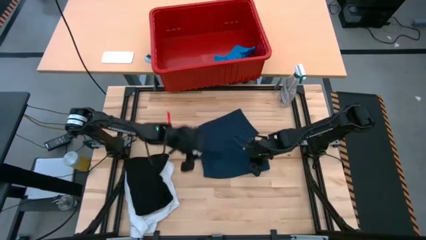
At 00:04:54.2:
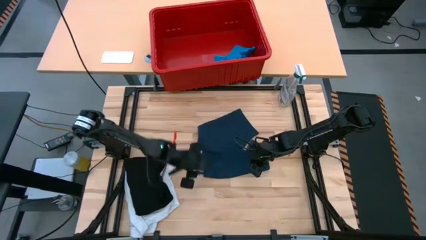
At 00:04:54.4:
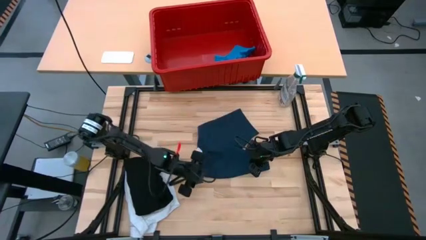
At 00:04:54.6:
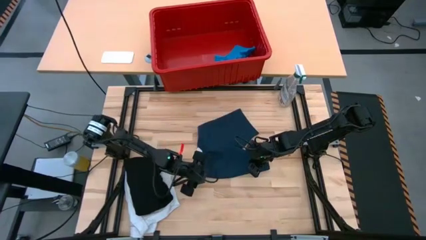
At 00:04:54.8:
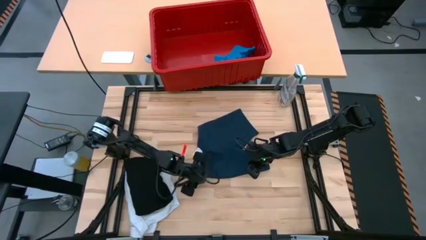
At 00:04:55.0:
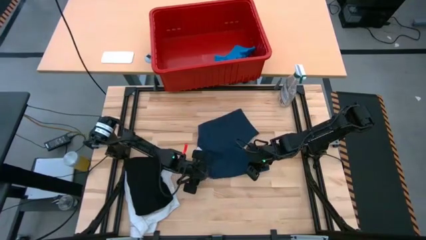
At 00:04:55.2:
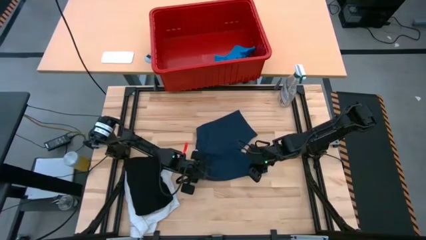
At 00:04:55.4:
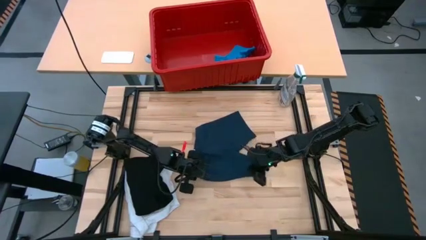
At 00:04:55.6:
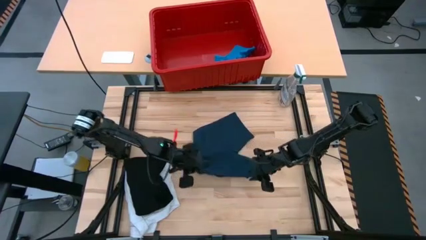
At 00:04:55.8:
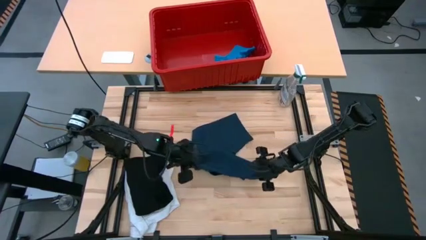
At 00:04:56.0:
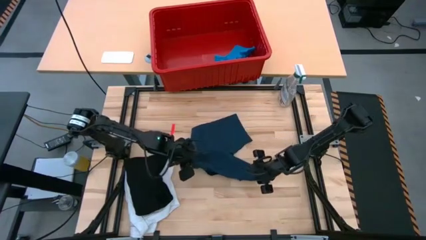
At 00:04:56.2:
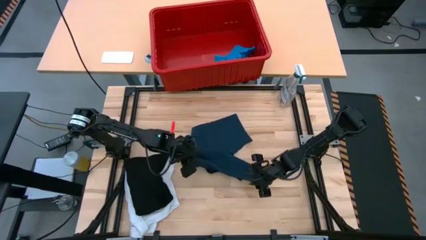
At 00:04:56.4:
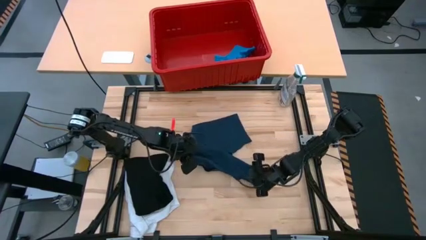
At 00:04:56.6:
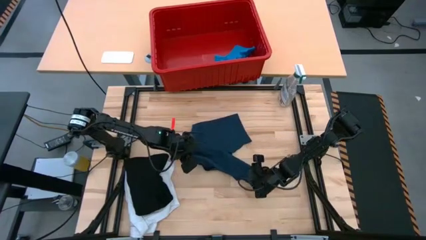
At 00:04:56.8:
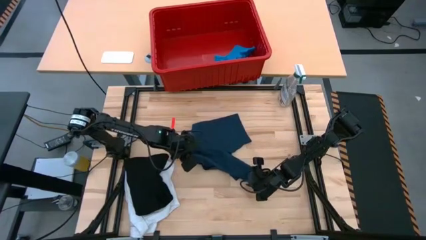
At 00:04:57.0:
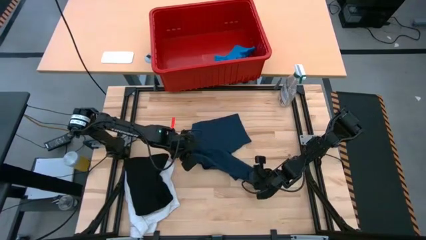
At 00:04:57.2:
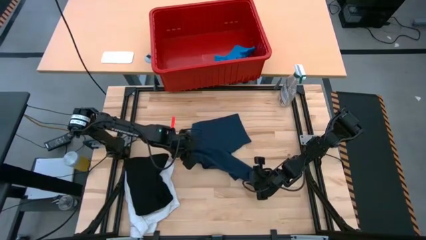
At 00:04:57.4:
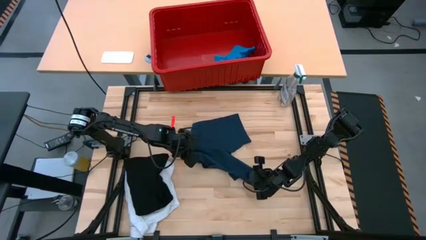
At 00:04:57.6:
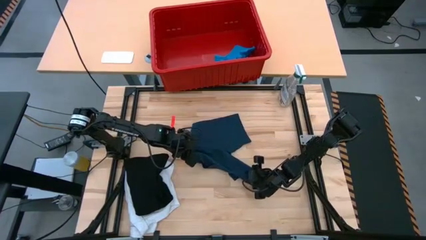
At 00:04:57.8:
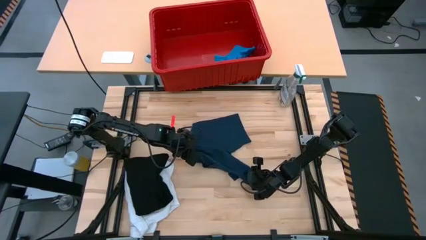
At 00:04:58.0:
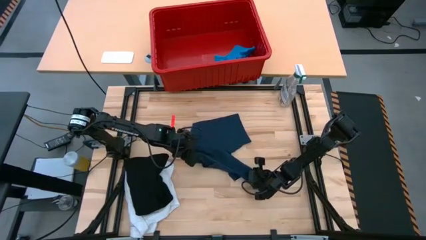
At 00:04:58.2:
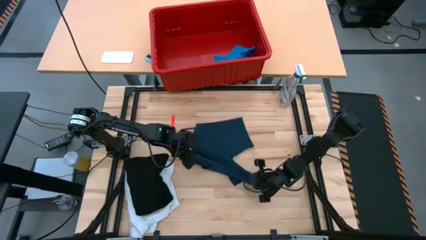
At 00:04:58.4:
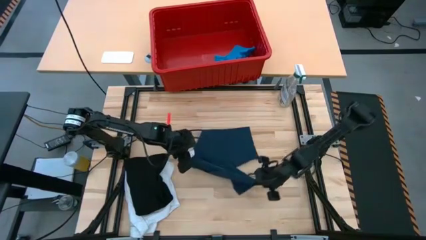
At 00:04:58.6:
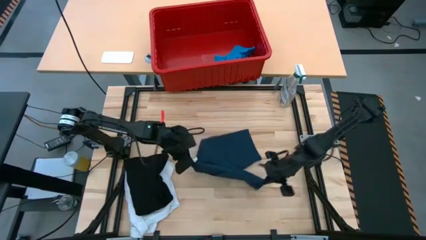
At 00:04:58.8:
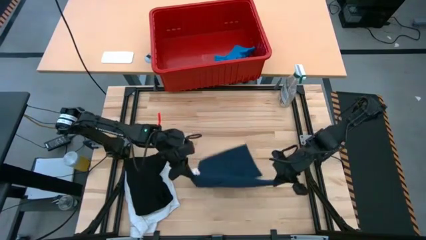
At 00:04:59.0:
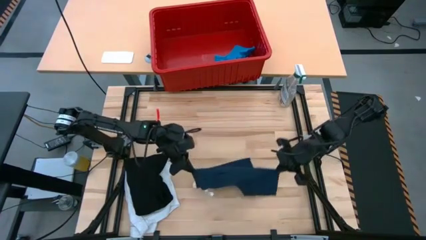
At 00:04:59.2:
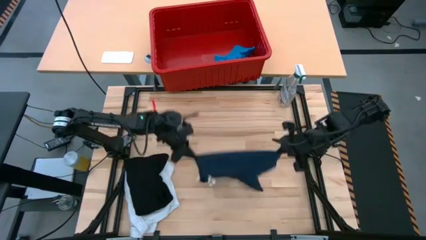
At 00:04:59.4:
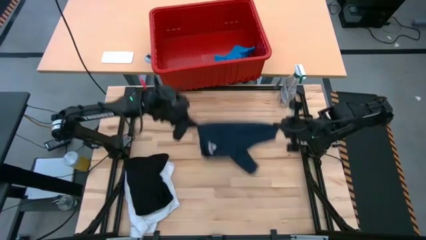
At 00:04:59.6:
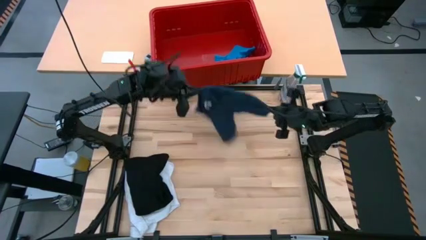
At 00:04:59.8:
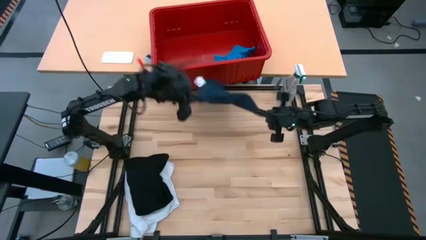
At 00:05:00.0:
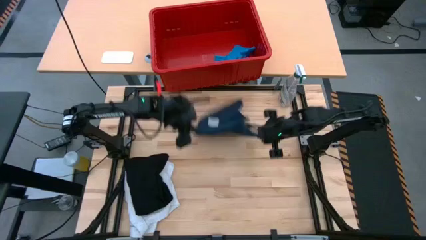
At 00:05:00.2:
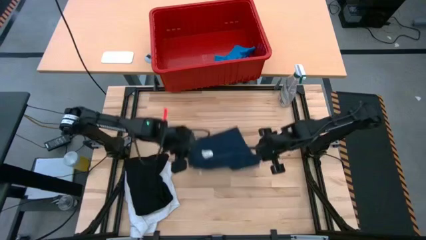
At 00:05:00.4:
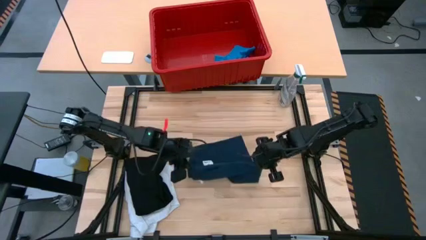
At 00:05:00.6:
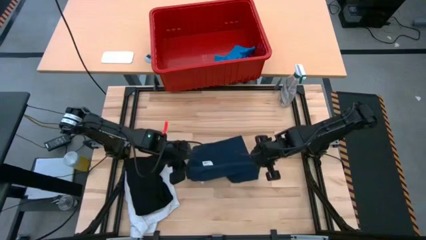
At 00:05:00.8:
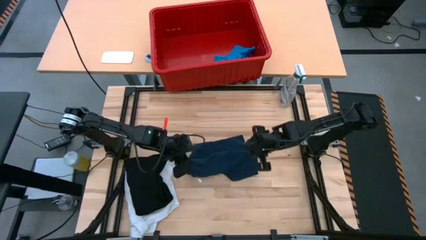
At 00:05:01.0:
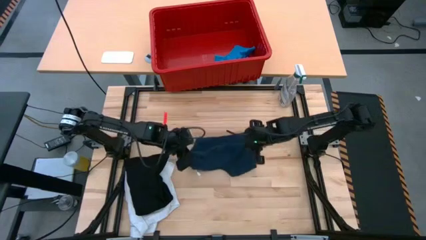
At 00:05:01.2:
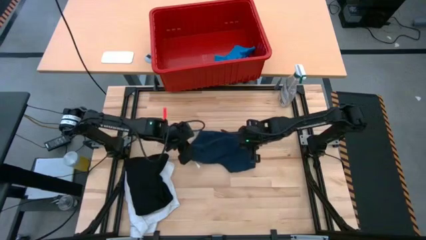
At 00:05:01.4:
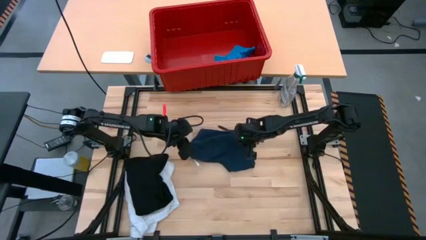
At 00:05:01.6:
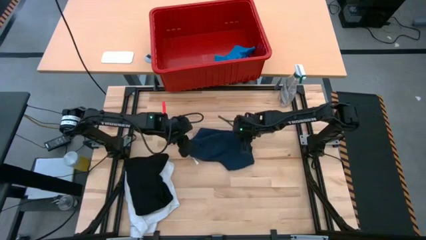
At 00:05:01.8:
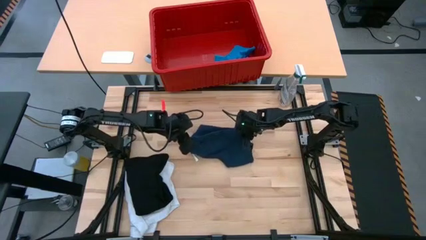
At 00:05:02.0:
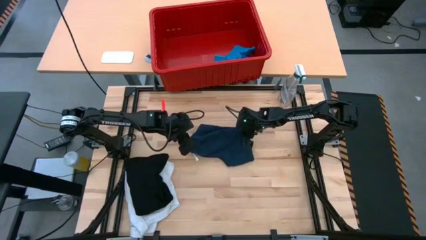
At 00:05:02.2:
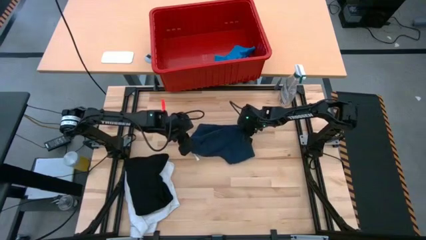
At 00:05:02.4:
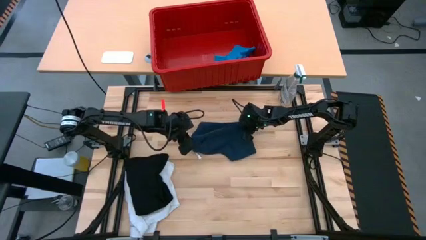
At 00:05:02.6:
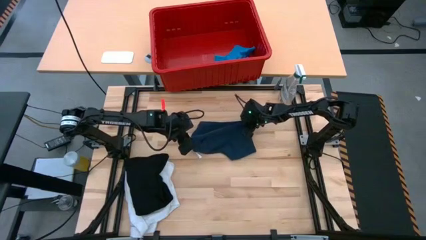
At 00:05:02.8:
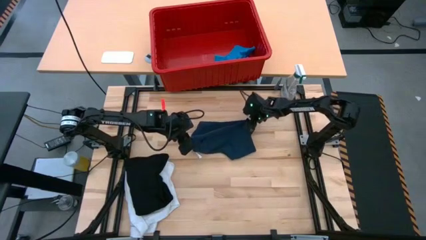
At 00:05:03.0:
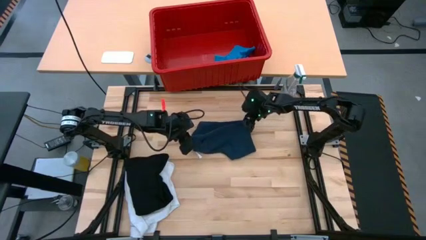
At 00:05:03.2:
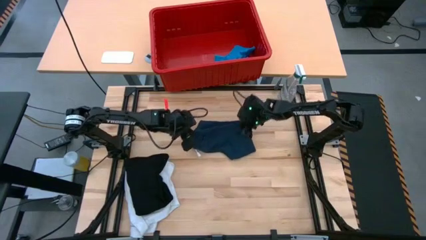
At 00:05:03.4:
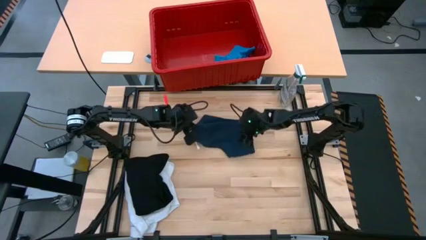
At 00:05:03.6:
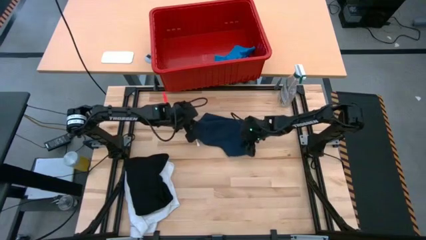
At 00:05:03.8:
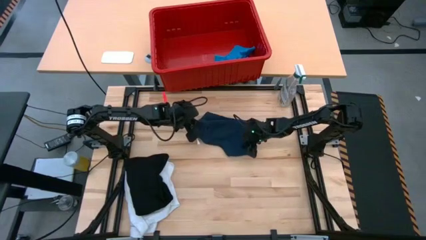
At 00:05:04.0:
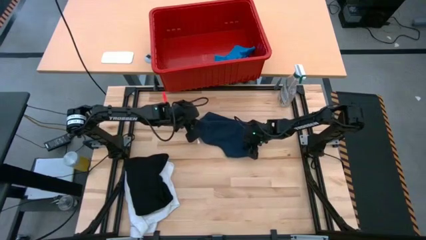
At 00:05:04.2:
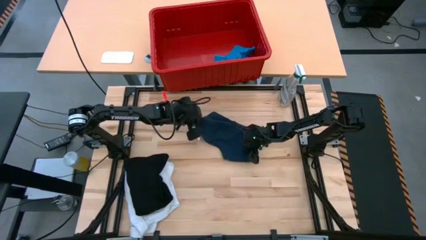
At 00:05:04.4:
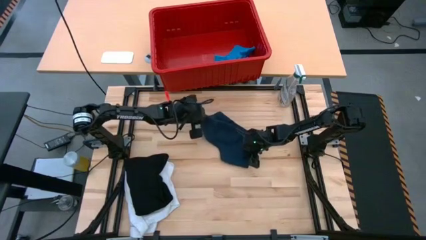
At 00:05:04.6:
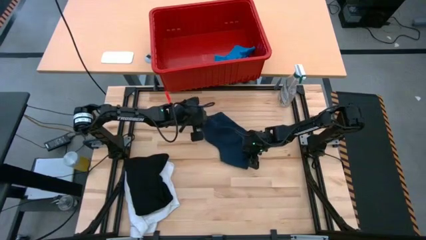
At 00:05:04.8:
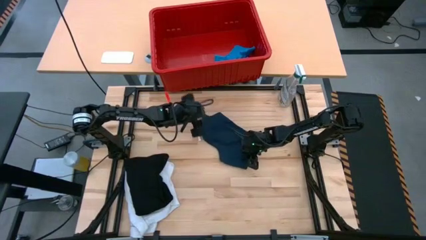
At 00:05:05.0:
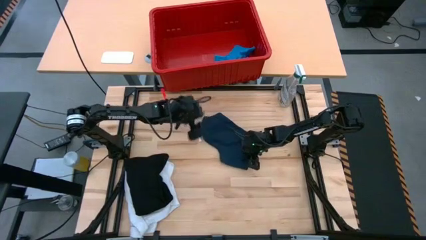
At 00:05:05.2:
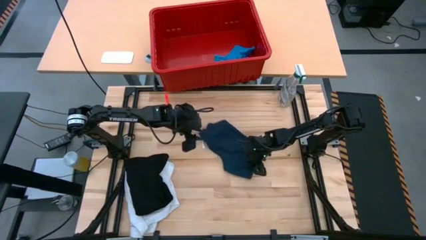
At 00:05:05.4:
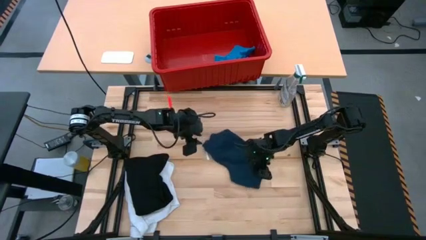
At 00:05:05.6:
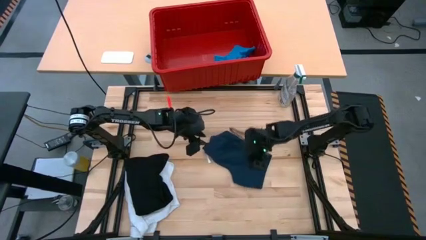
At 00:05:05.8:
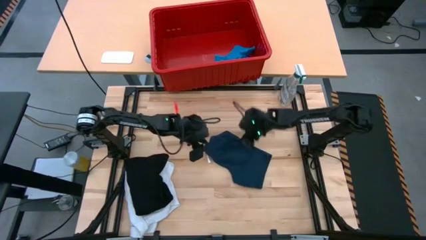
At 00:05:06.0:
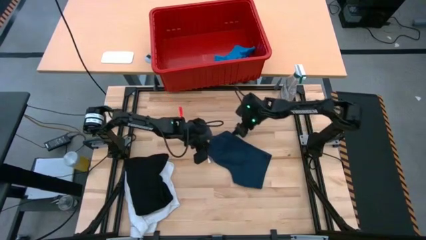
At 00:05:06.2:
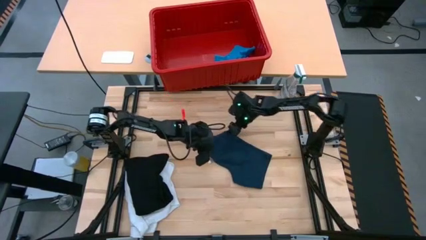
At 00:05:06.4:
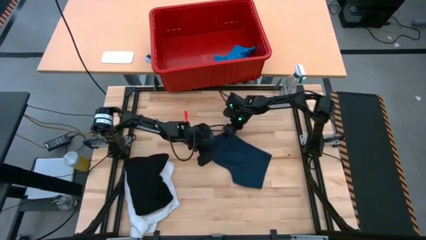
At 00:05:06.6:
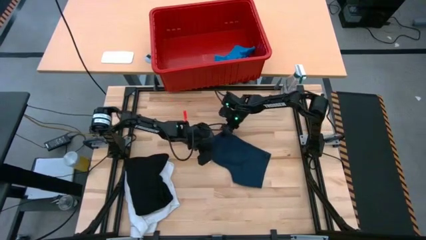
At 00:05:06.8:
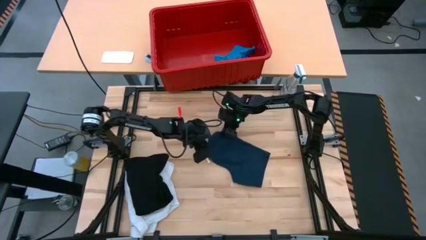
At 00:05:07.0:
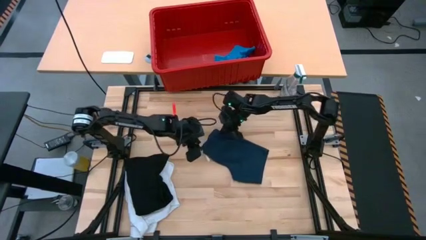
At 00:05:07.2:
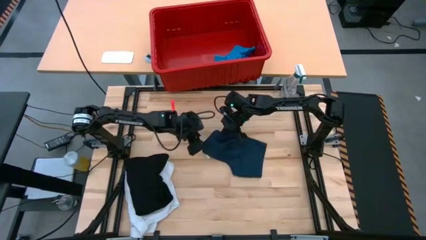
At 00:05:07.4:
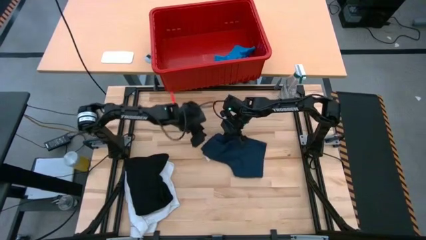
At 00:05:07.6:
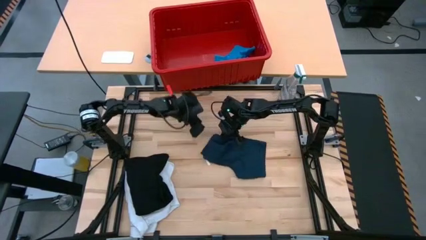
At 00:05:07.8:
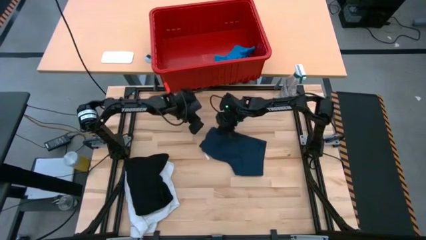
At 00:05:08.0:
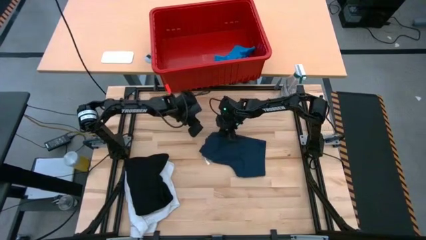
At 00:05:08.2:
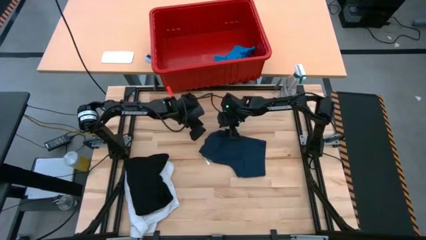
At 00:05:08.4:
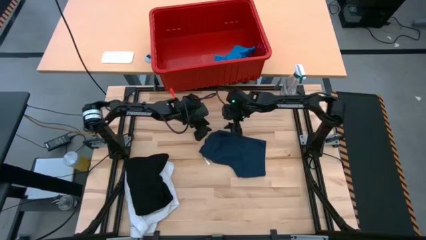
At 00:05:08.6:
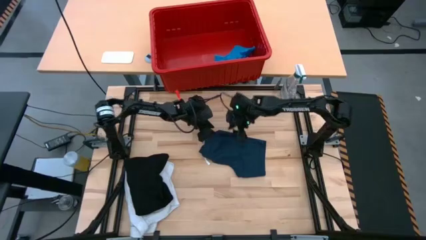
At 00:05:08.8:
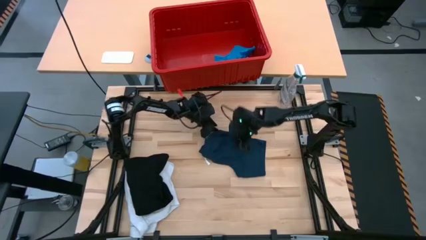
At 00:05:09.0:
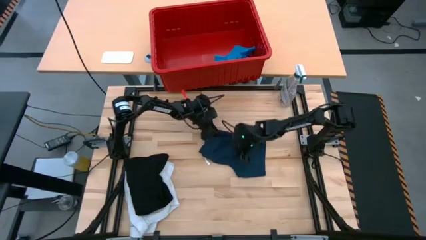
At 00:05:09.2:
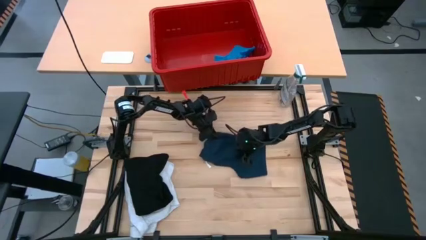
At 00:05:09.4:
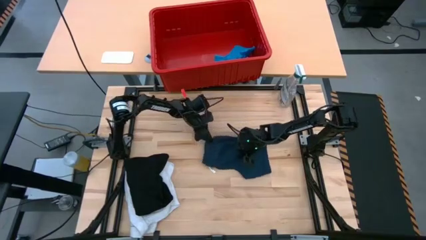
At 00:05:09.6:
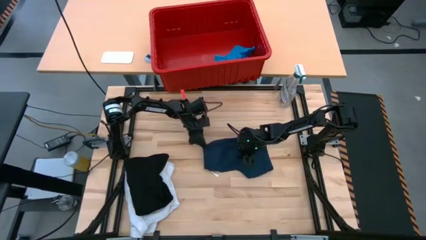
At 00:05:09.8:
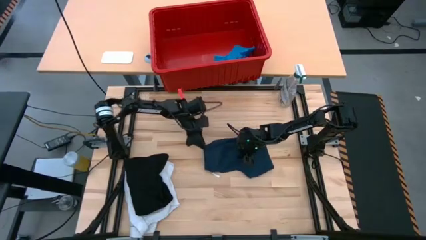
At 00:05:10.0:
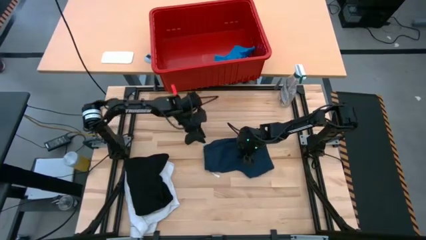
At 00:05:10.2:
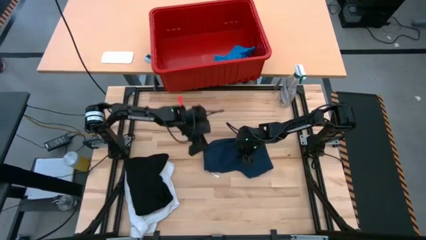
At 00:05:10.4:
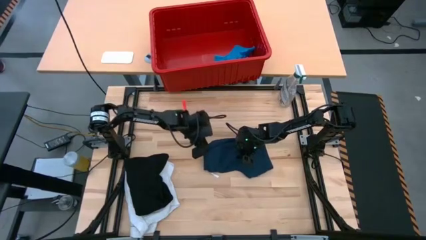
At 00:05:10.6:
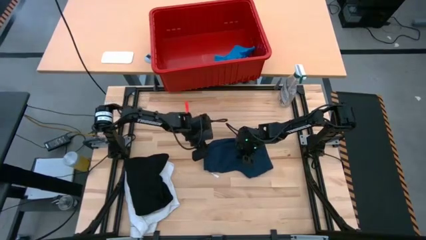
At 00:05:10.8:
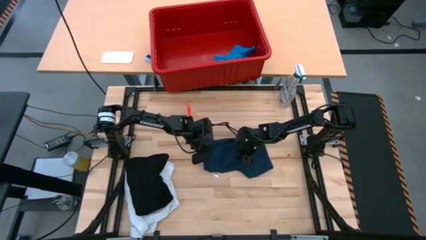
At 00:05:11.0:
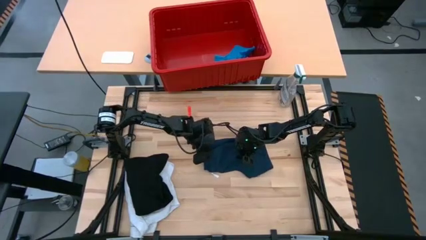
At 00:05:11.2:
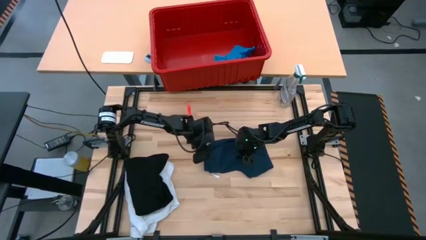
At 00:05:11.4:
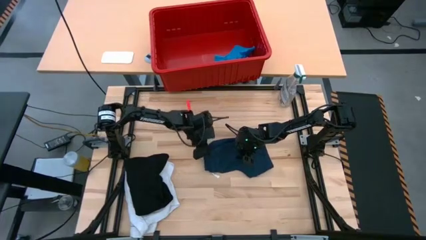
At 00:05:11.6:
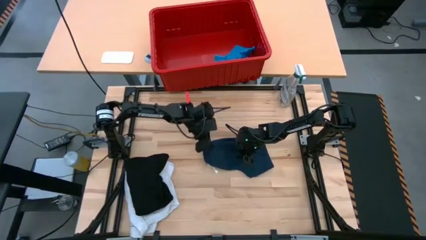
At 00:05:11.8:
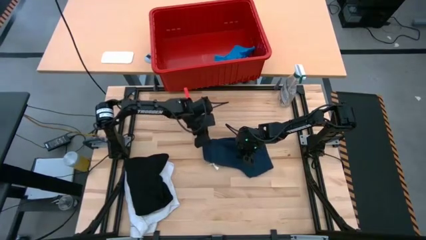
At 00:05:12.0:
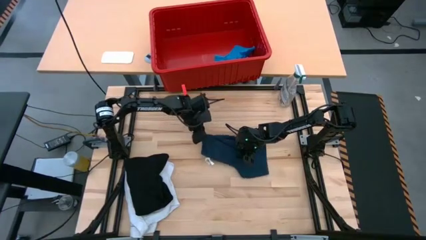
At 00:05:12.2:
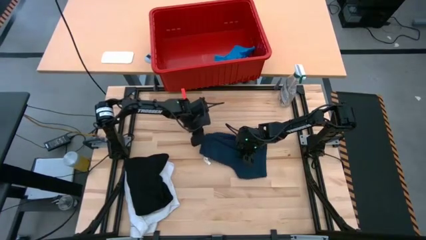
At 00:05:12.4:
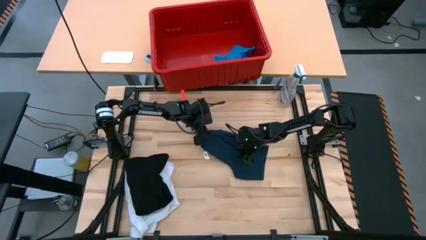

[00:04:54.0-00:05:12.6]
Task: Fold Laundry from Bin
Fold the dark blue shorts
